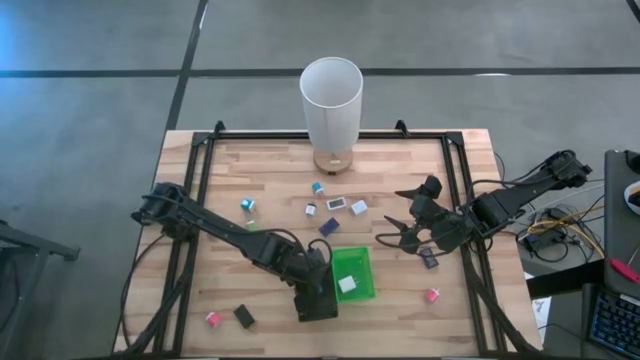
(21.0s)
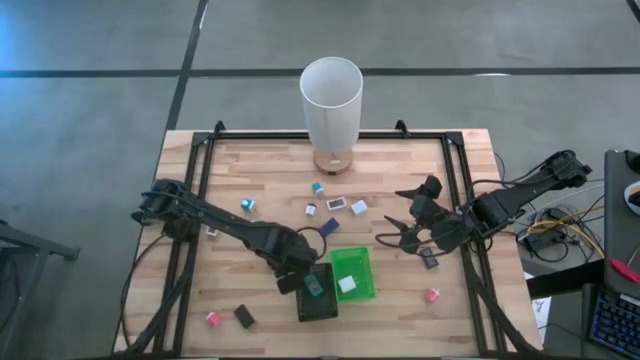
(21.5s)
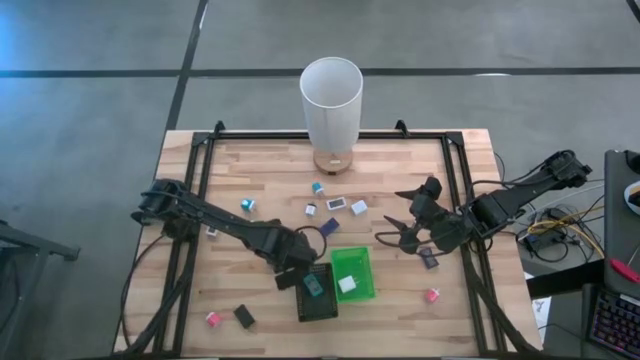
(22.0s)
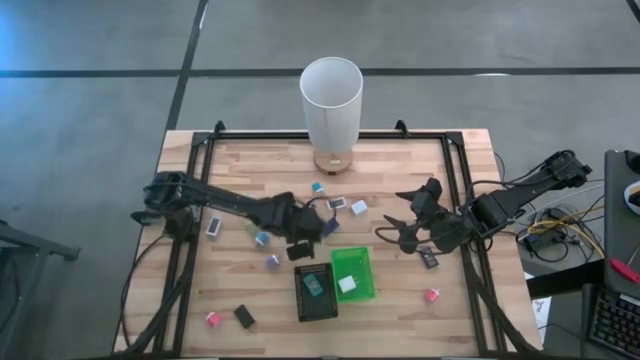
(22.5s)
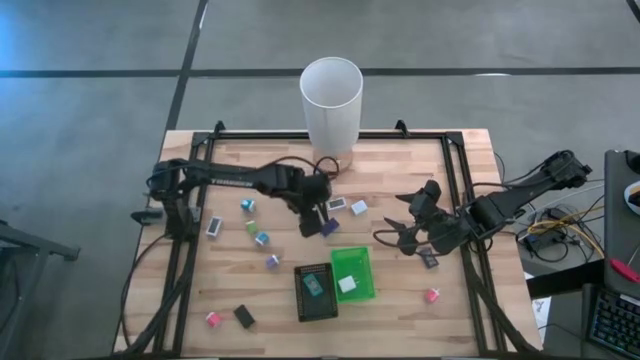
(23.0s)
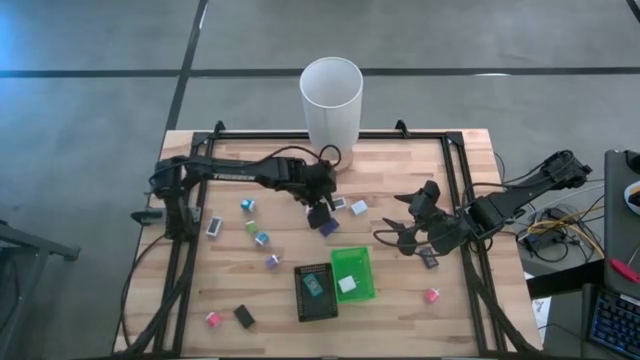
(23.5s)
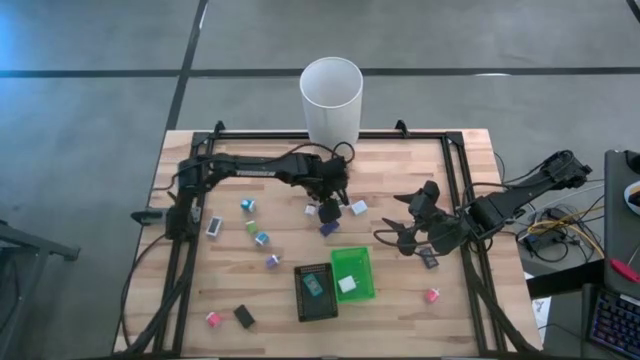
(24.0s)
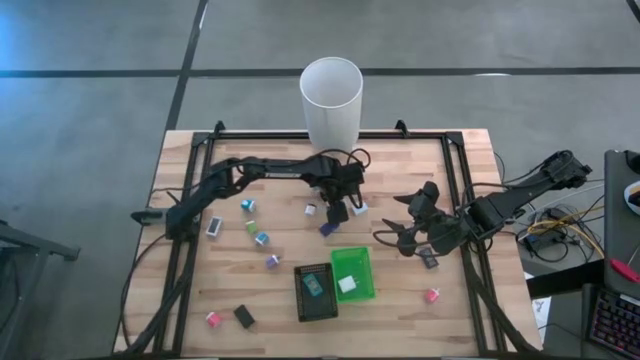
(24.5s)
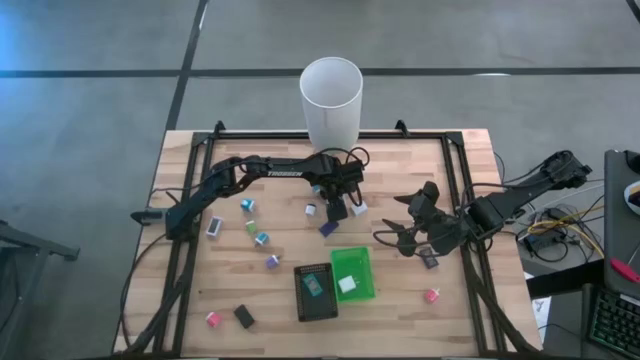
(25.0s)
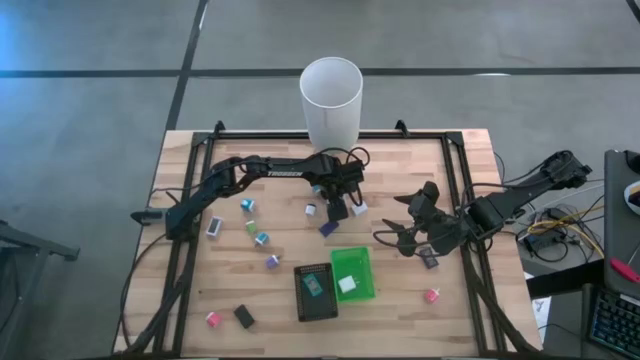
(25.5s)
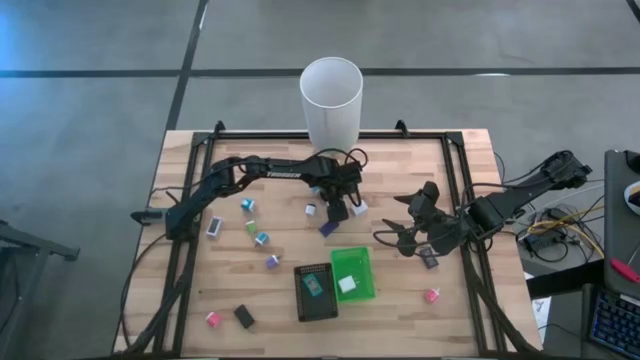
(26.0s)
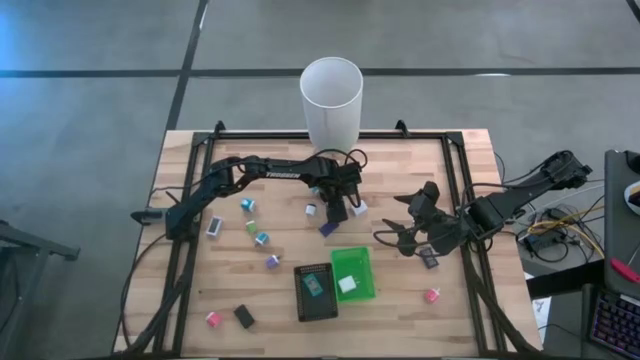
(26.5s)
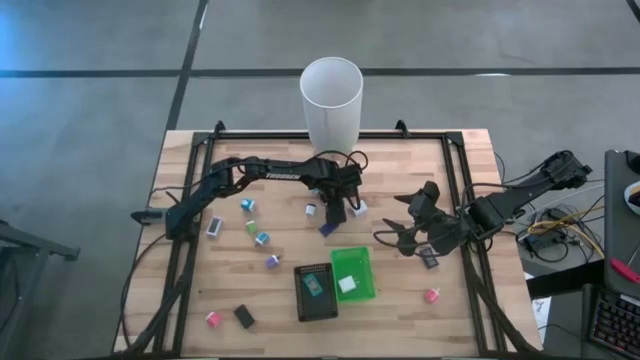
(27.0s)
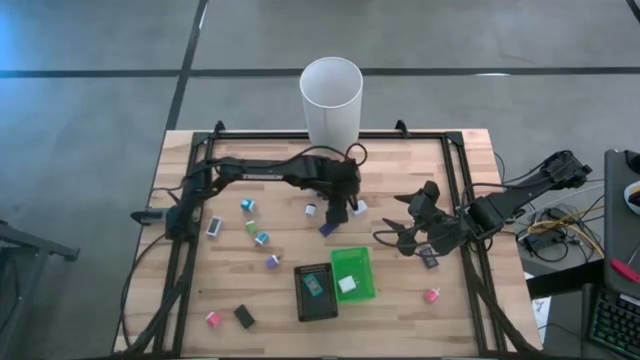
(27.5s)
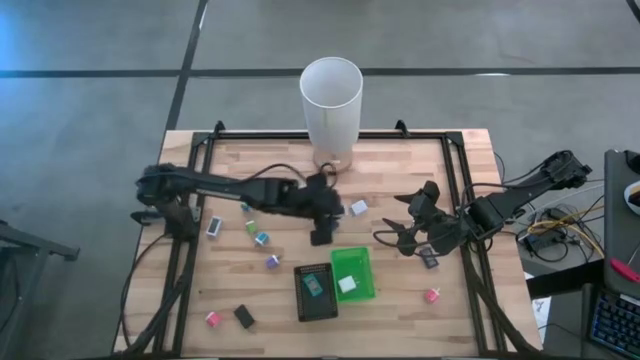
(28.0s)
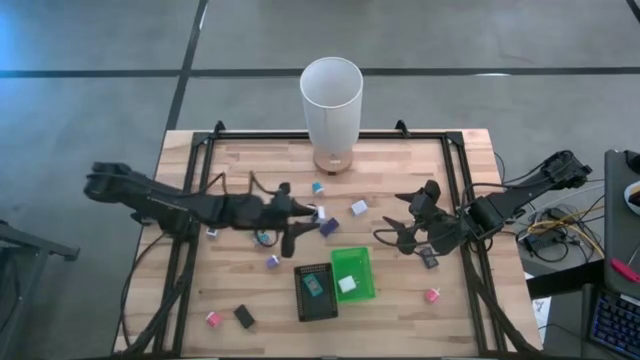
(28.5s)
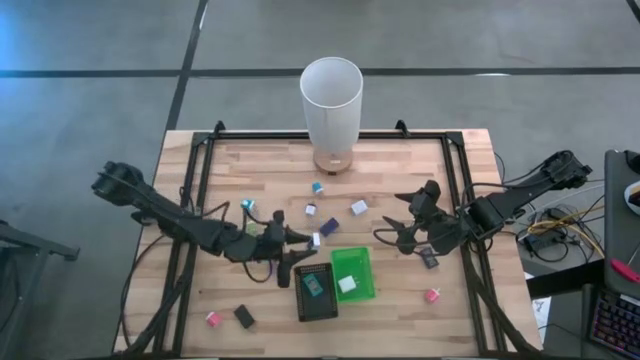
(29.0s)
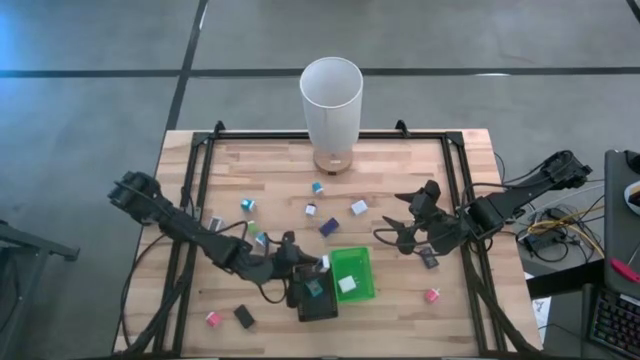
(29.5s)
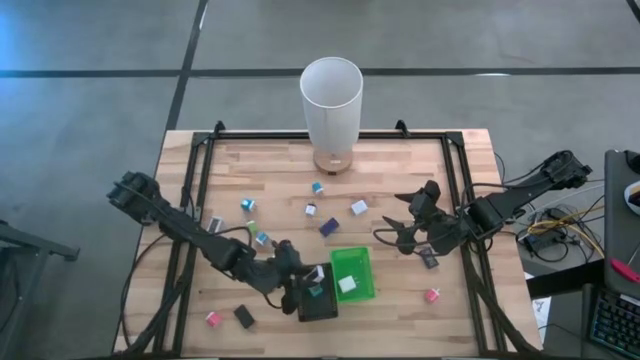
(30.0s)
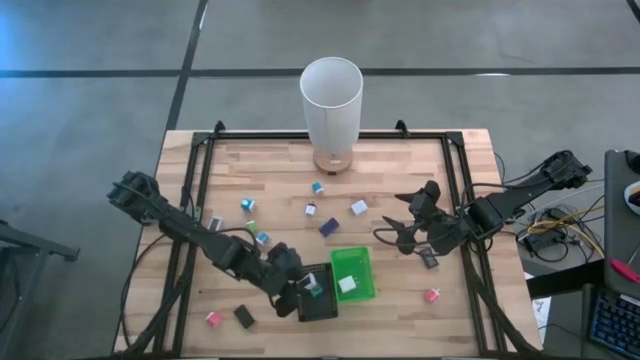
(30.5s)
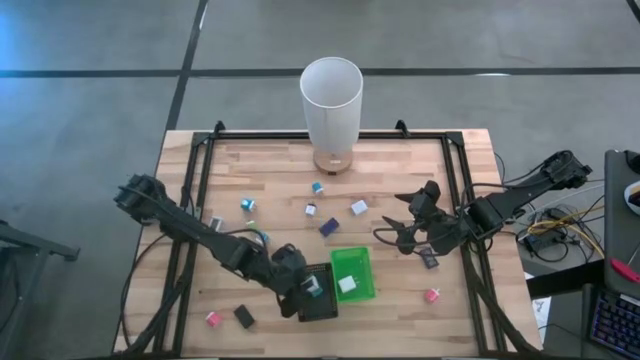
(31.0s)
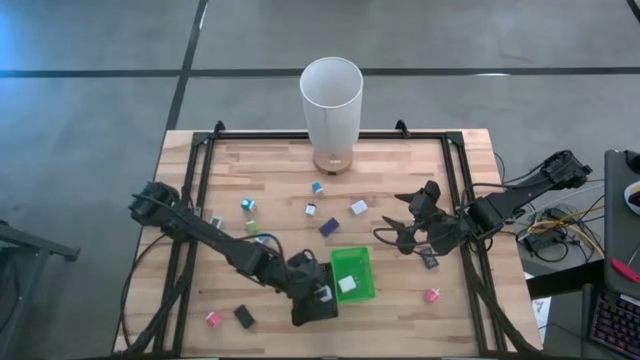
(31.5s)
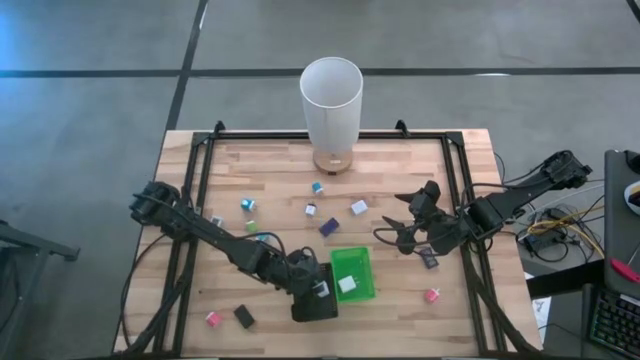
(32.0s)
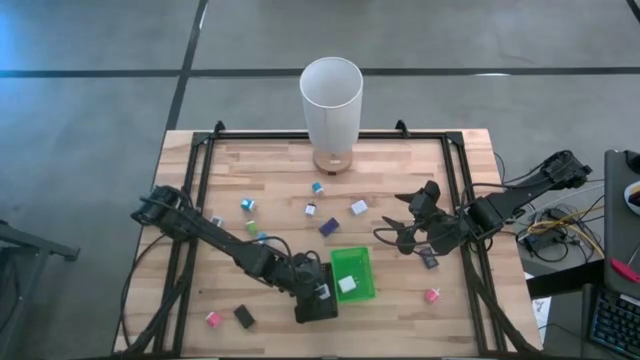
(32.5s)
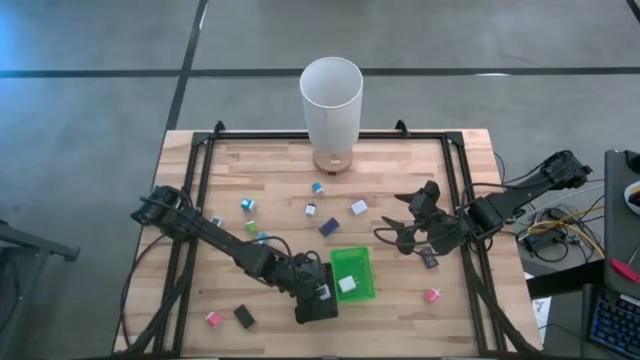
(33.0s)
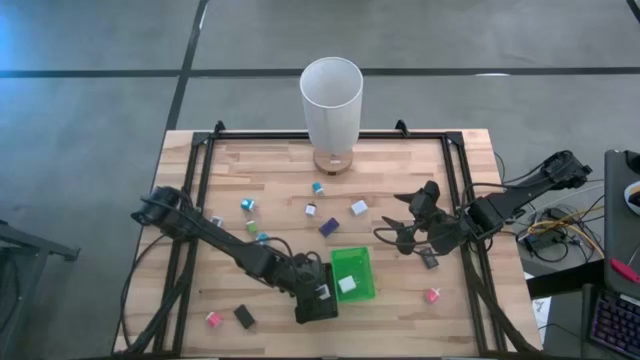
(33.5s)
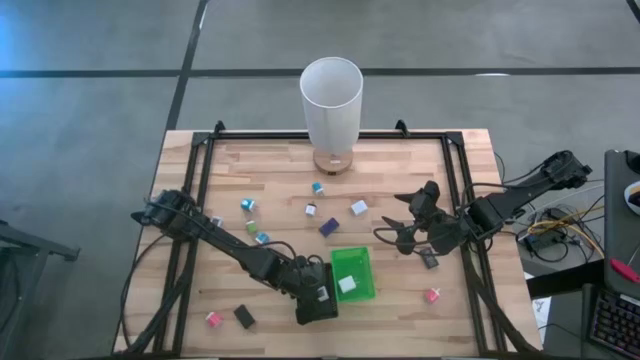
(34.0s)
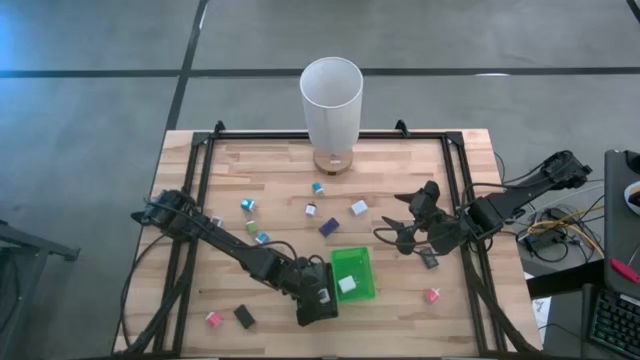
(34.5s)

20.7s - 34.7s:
Task: Pick & Place Office items
Put the right white digital clock into the black bin

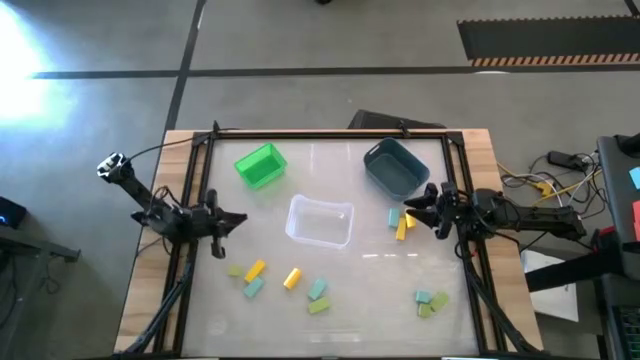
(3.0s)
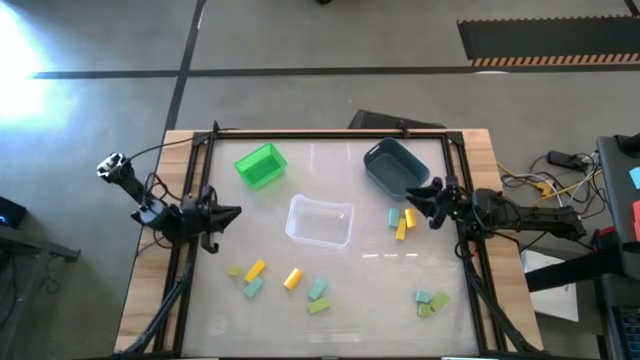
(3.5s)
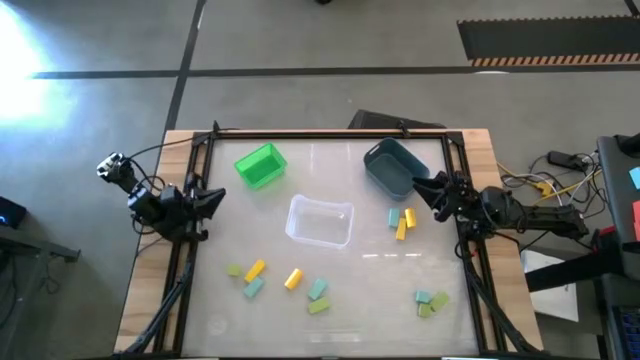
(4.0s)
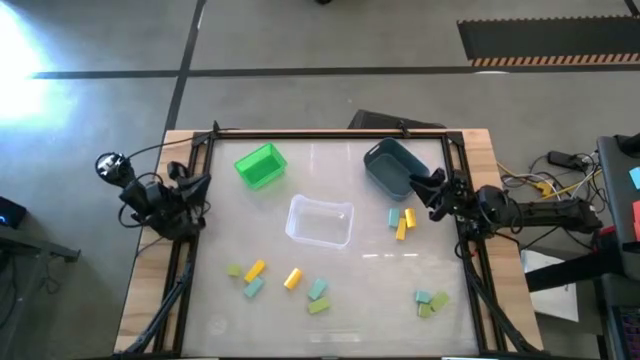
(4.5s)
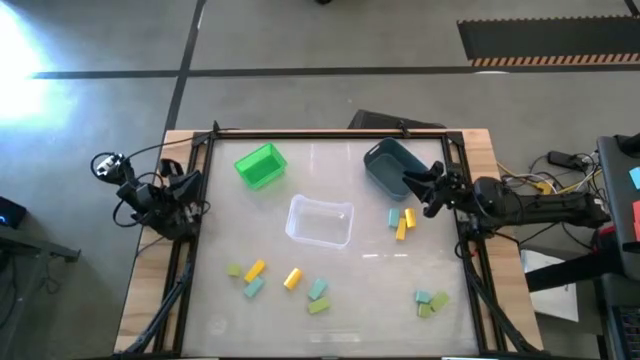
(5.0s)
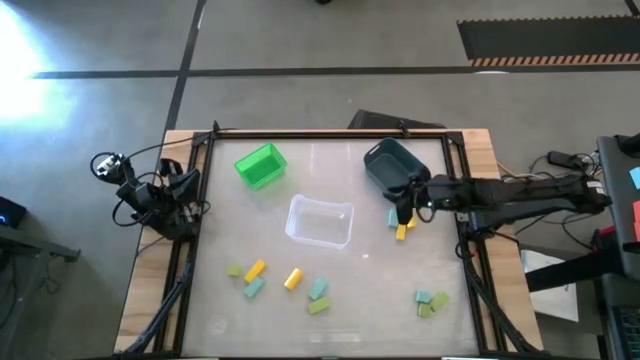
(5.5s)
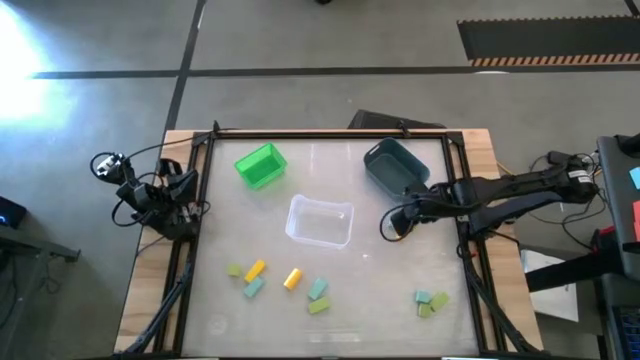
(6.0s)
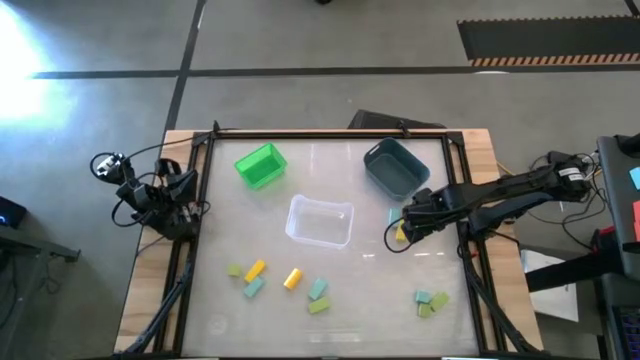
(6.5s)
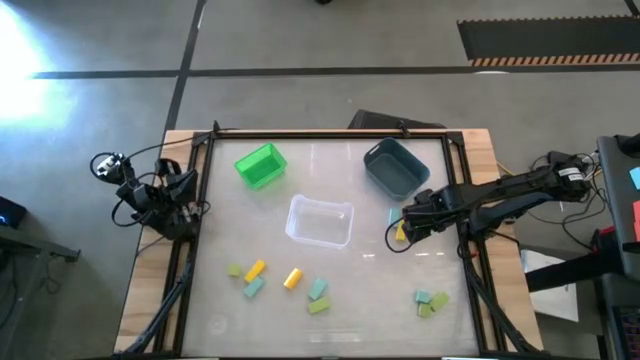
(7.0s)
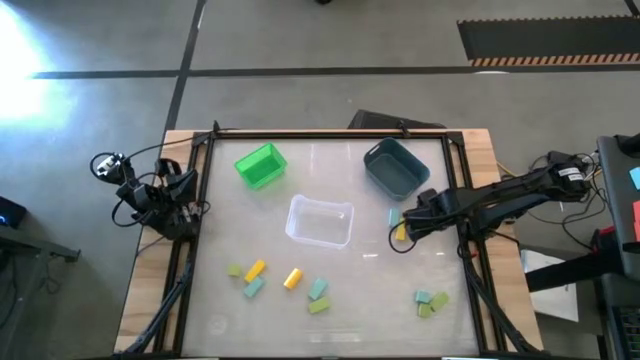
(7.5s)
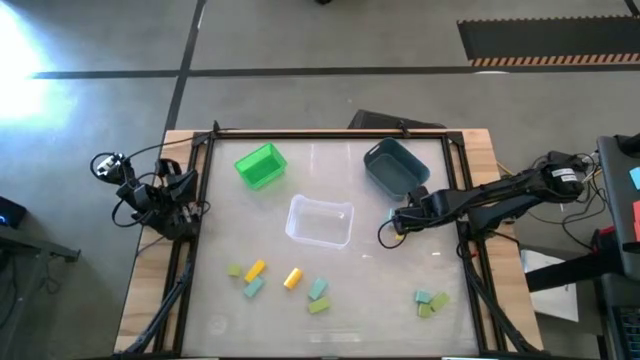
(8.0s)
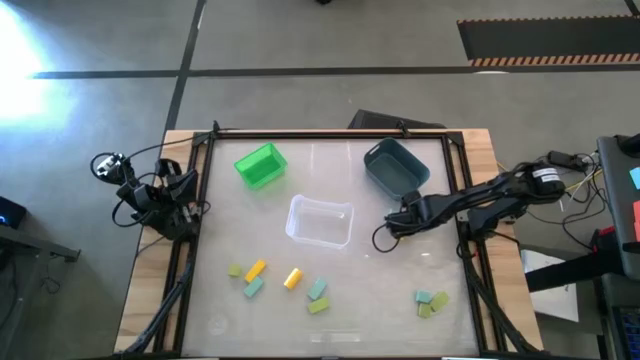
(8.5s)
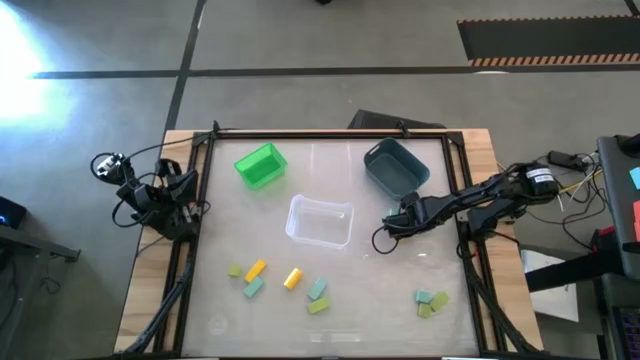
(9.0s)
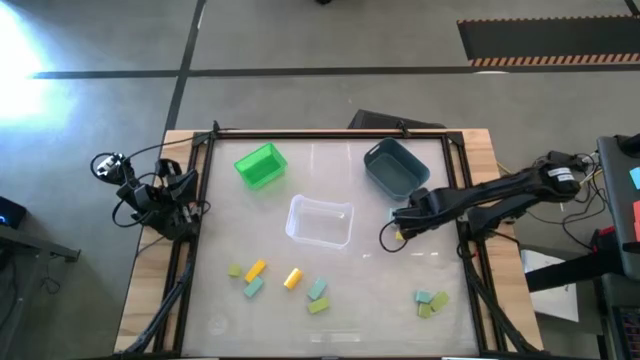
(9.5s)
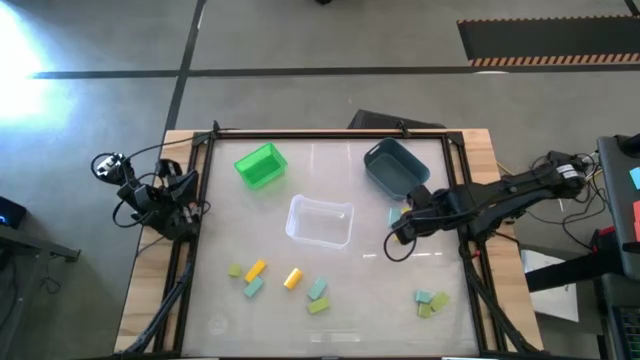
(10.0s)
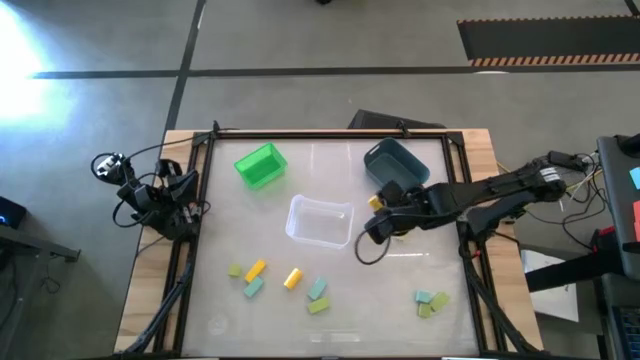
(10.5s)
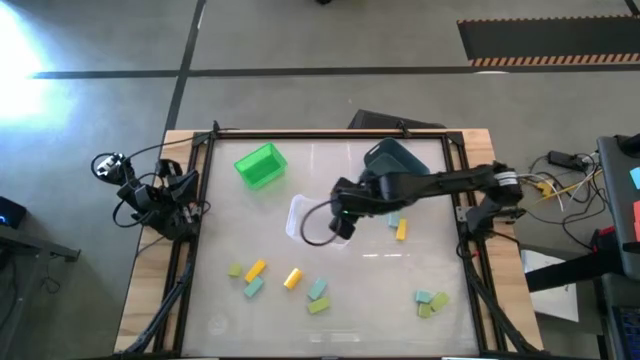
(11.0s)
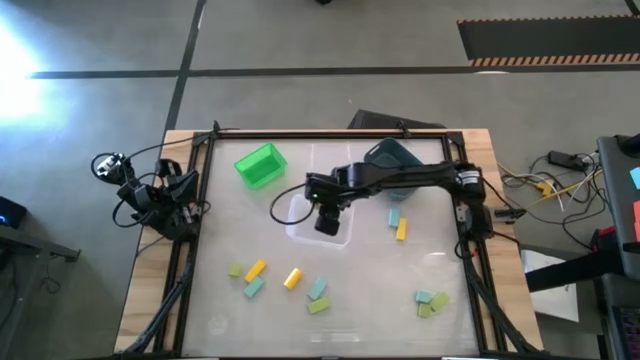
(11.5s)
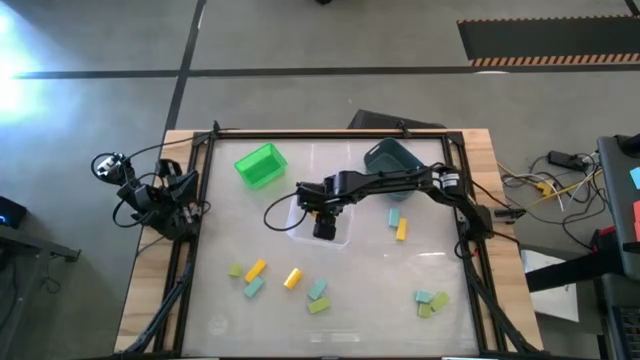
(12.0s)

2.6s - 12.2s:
Task: Sort & place blocks by color
Put the yellow block into the transparent bin
